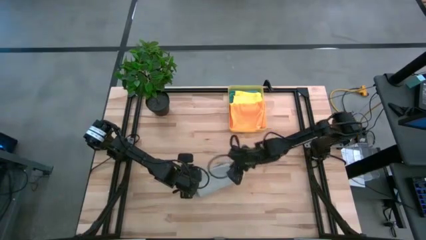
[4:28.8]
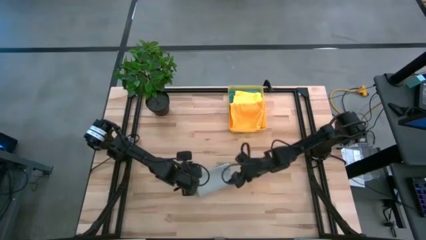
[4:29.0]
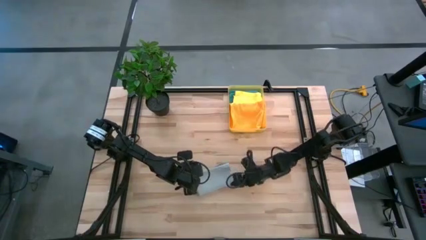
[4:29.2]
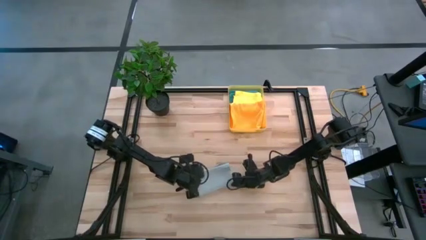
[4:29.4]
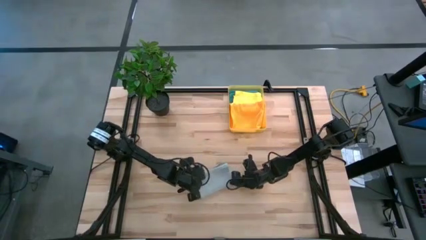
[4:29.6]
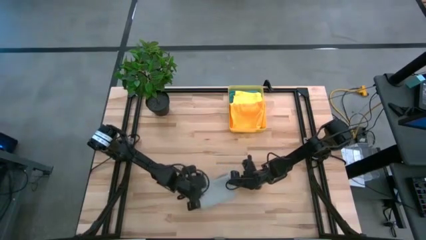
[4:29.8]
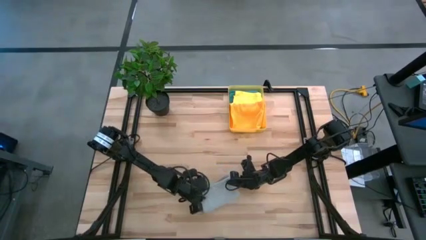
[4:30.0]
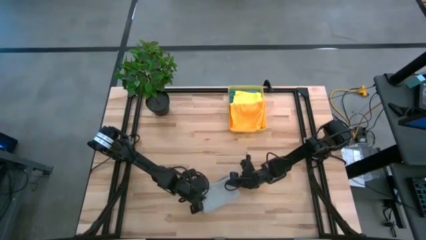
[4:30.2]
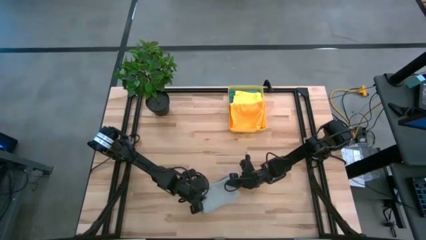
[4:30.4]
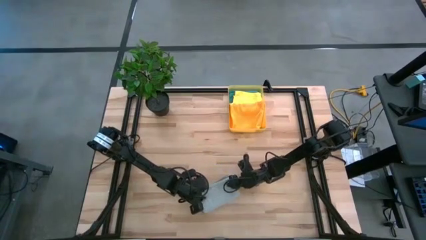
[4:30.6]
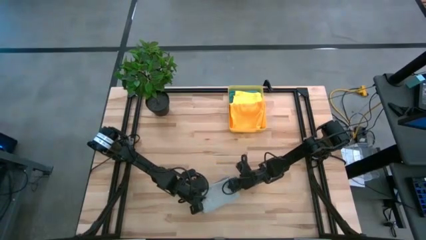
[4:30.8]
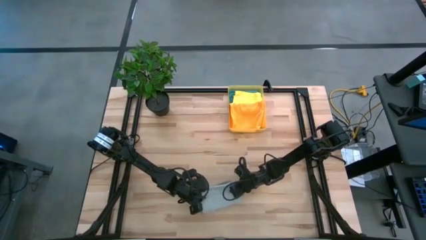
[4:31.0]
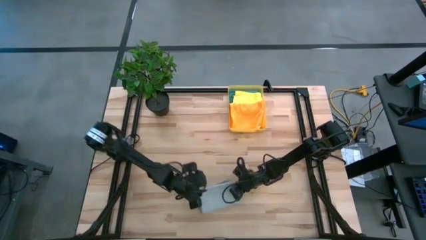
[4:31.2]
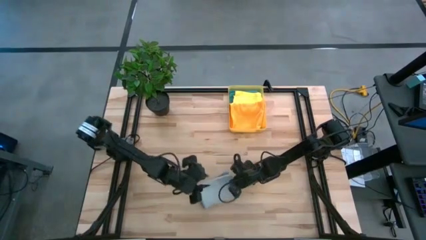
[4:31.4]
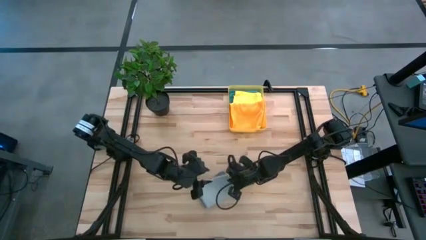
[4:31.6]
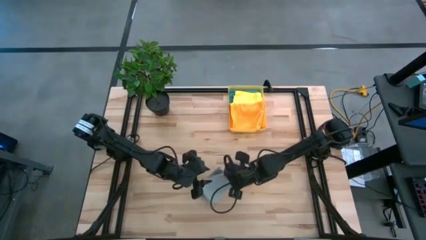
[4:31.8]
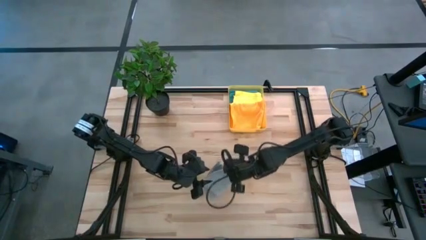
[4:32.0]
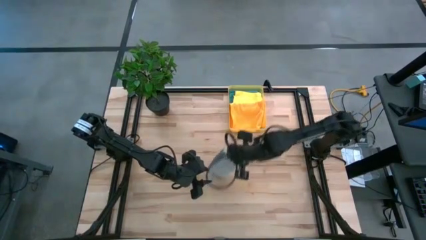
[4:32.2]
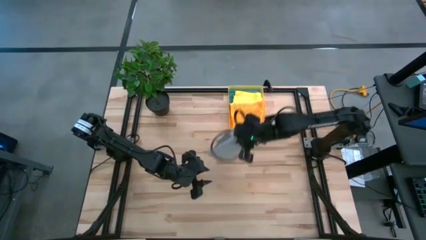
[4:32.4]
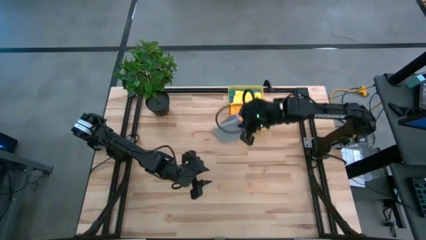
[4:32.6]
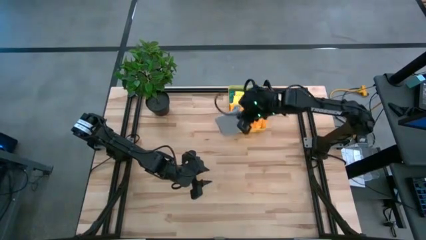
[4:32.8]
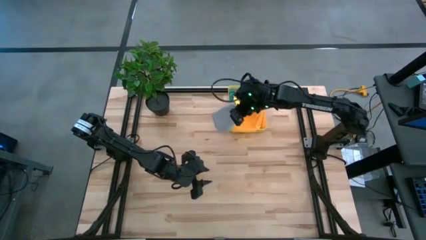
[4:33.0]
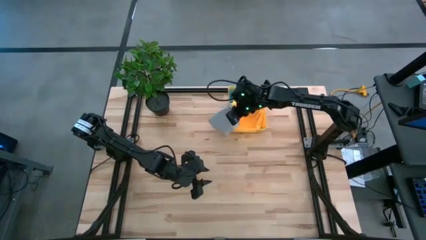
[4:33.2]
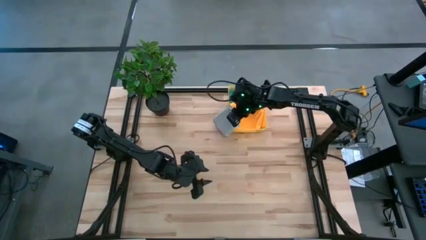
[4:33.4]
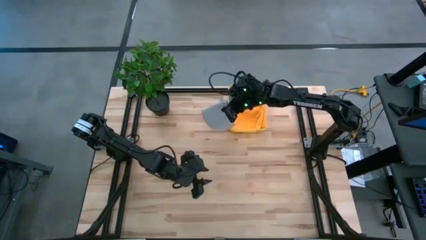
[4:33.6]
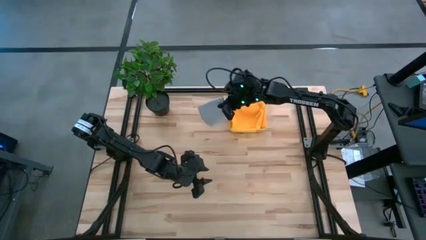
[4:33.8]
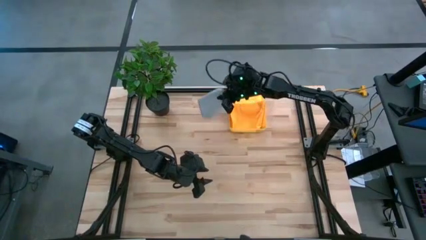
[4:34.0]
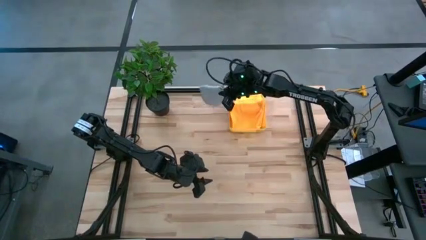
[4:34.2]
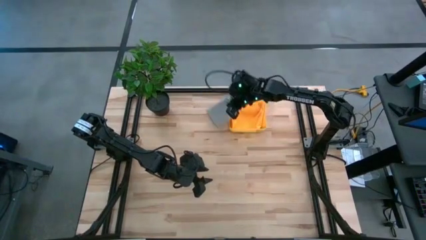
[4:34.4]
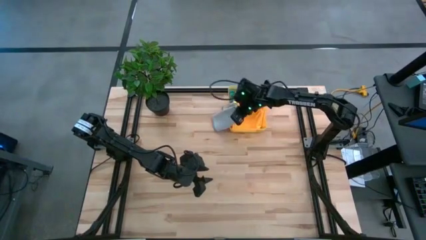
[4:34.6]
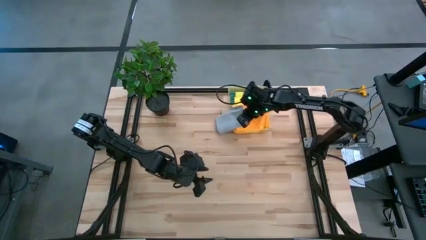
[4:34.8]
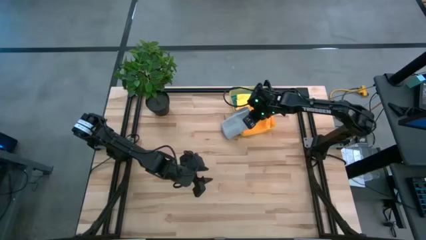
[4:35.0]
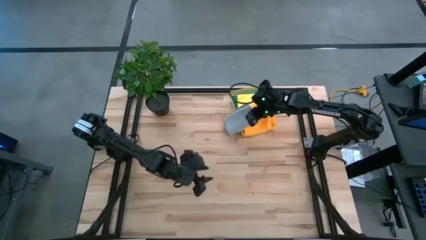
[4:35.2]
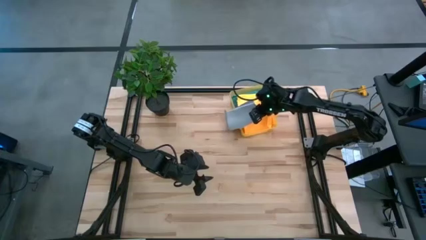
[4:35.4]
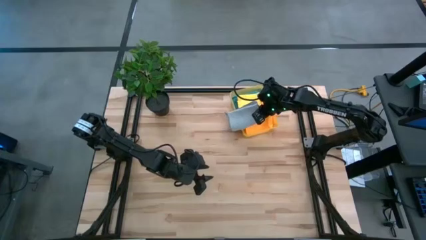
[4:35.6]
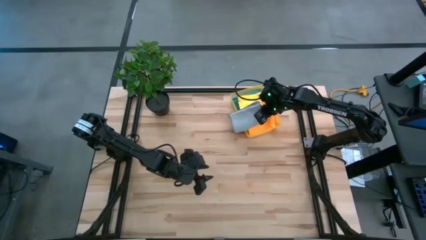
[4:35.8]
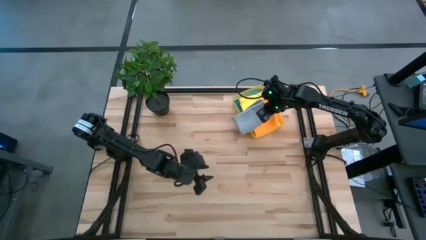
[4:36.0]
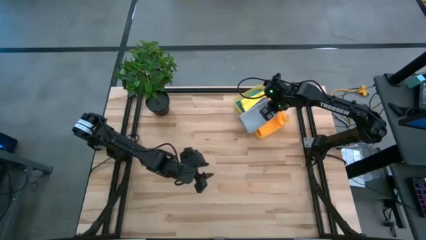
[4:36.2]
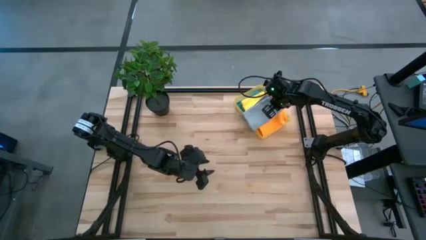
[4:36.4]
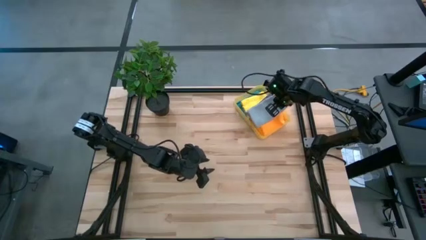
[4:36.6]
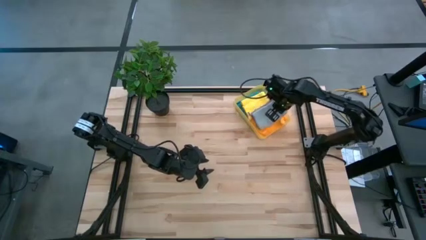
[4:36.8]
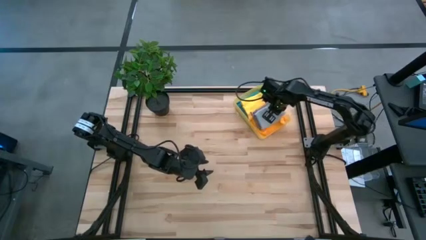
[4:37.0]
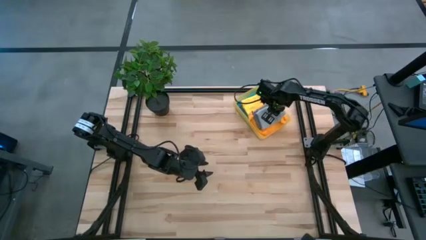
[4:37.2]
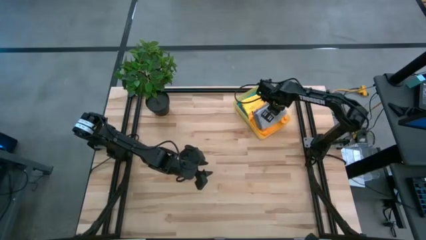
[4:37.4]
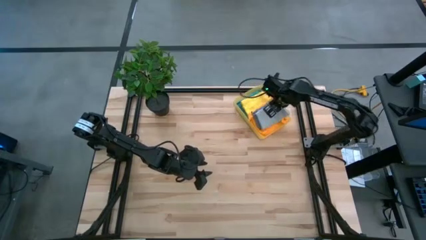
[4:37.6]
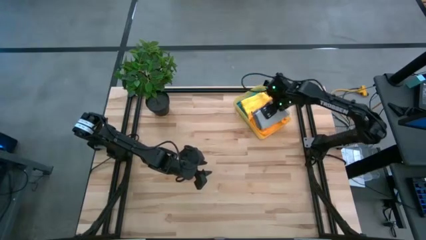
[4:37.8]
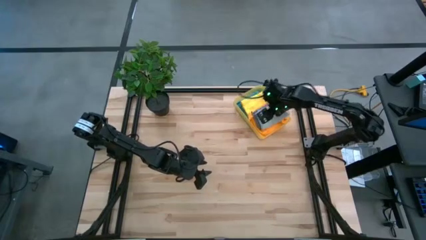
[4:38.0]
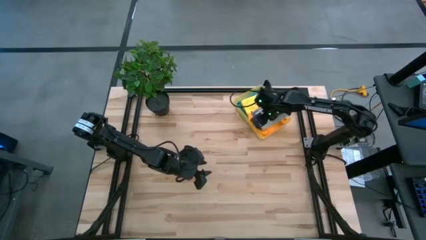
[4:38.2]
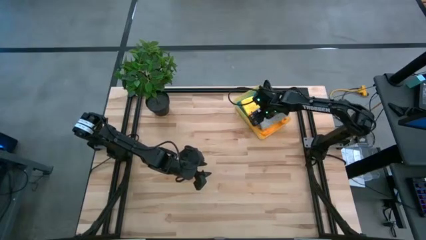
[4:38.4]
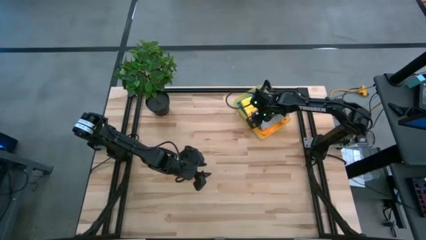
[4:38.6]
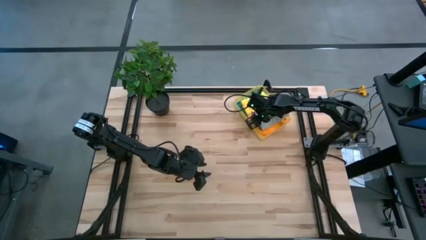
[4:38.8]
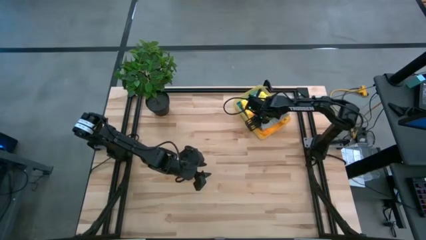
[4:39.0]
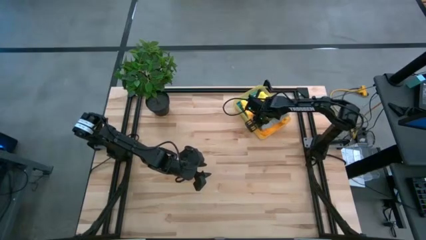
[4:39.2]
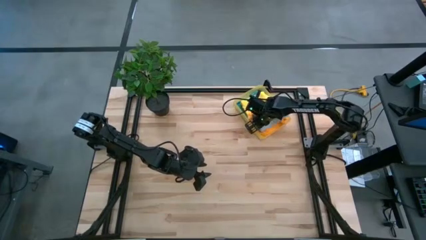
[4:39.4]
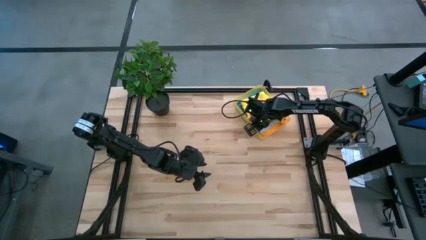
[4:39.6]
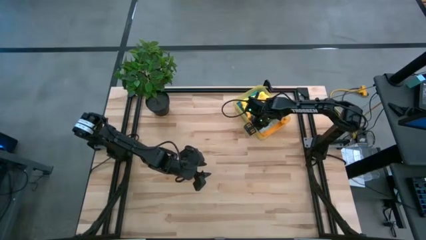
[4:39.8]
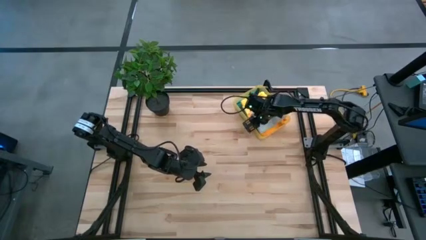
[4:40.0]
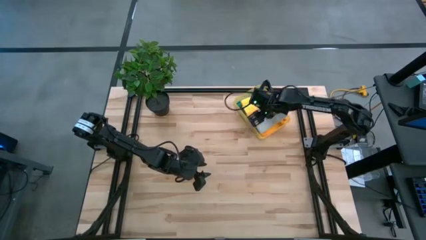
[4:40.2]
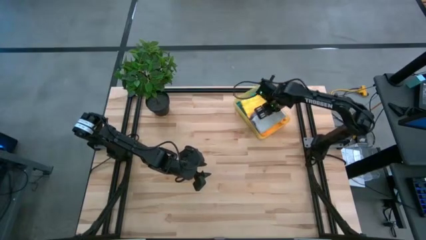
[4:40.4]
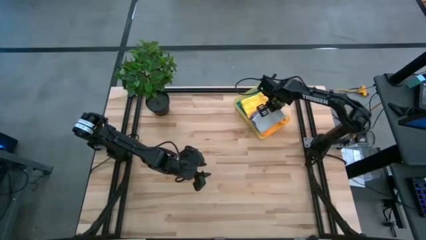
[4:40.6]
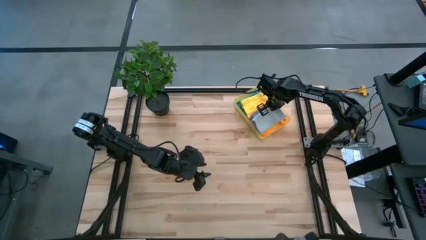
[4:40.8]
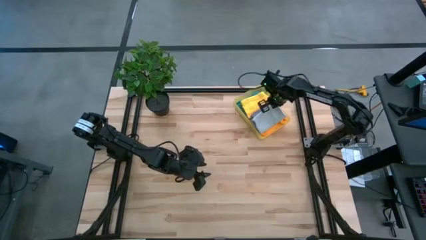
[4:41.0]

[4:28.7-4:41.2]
Task: Fold microfiber towels
Put the gray microfiber towel into the yellow bin

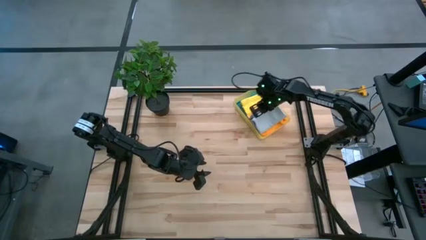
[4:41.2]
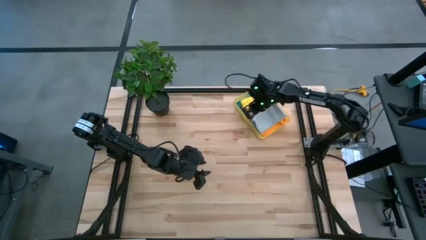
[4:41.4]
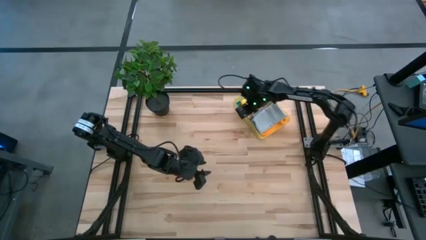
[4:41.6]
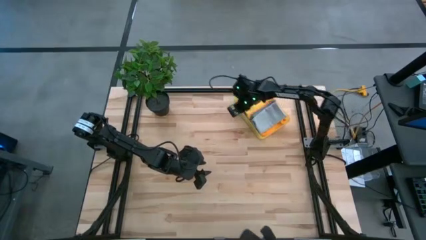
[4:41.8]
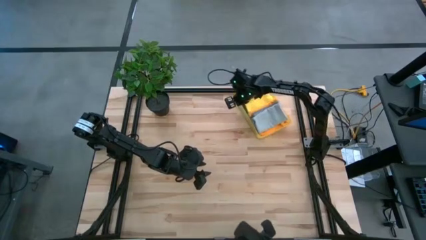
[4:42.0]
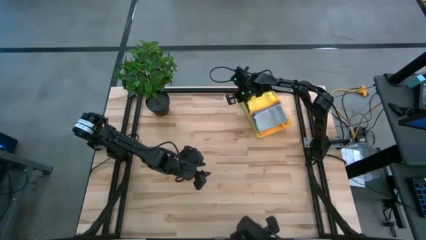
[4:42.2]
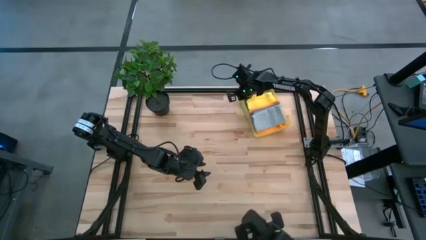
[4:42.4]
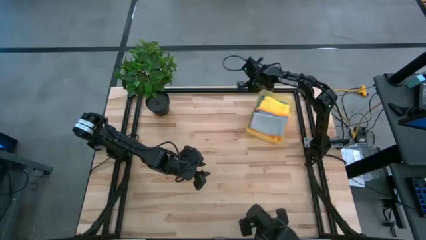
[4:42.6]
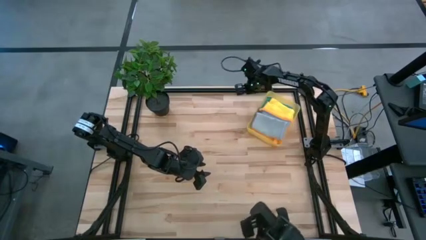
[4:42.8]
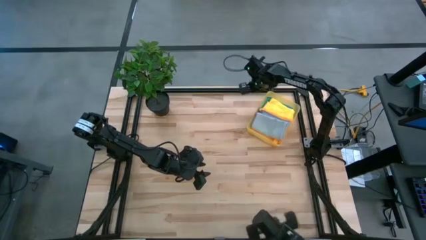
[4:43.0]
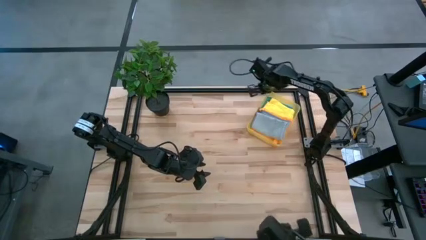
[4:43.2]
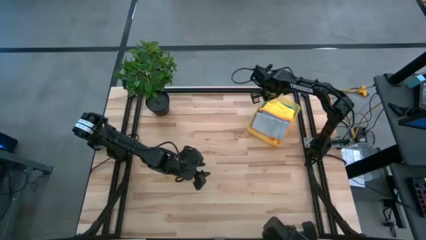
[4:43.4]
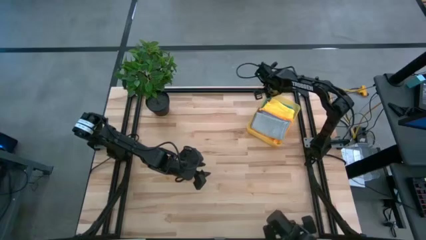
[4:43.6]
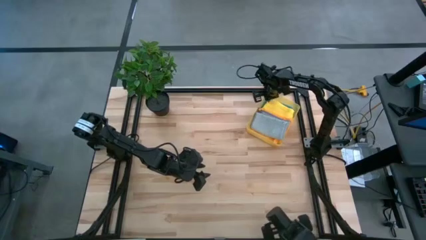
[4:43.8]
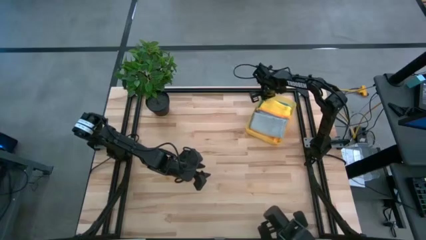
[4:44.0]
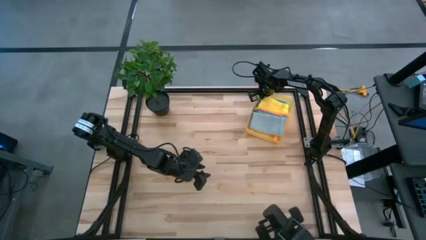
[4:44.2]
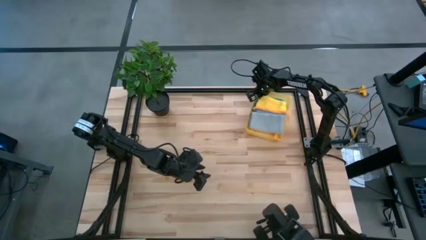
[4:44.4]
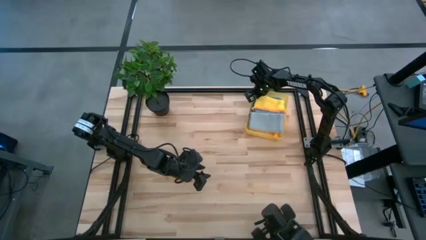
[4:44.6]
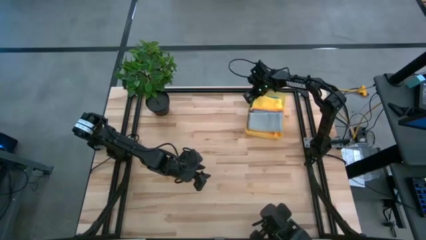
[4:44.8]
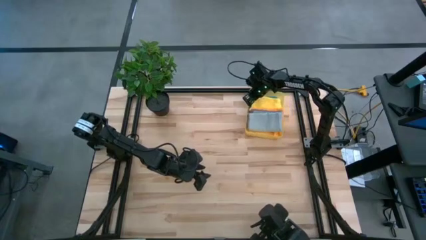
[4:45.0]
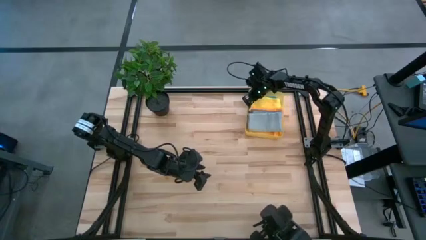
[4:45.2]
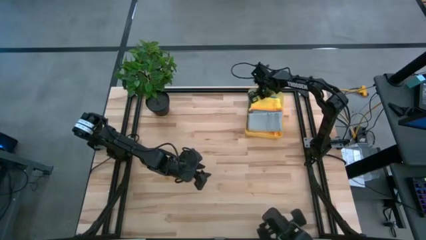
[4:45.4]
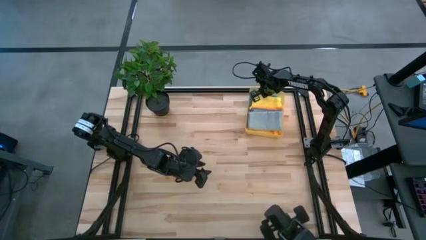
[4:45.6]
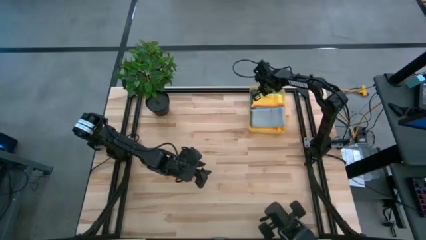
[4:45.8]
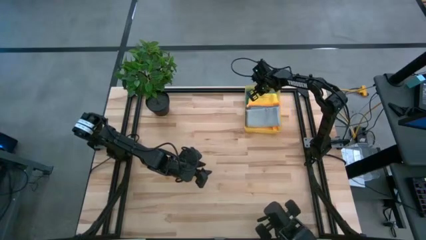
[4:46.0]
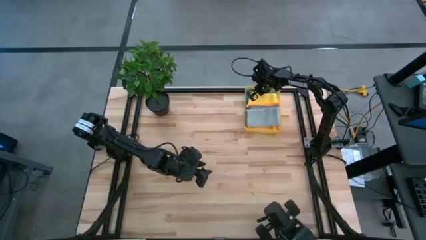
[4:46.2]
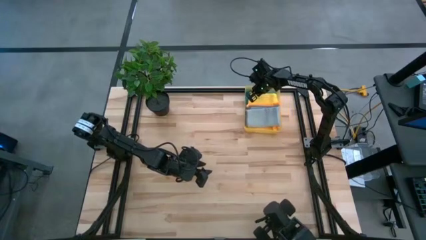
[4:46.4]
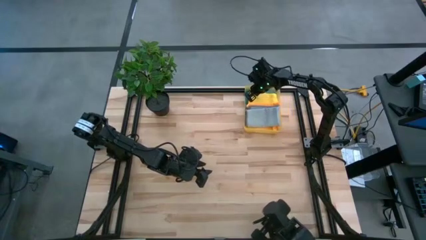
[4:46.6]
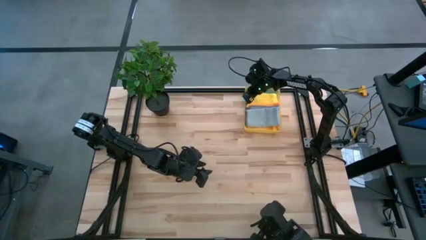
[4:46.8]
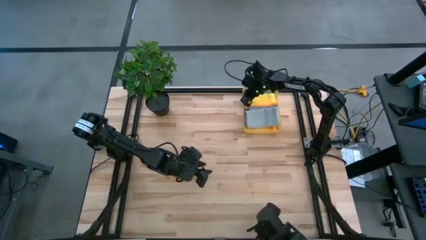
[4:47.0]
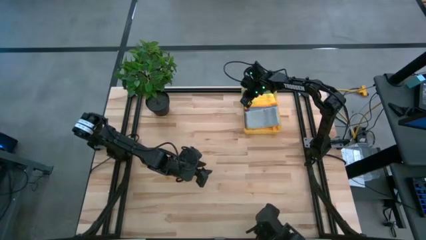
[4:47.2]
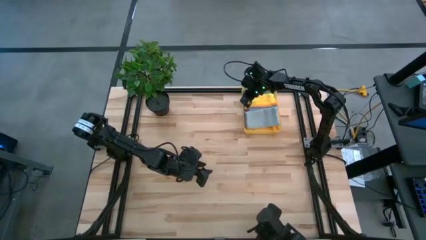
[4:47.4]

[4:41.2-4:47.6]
Adjust the yellow bin
